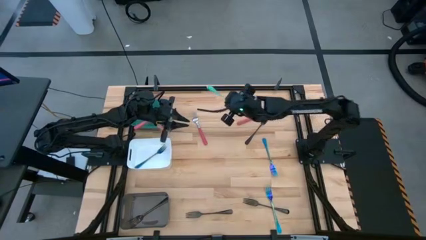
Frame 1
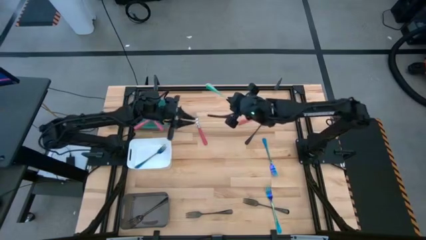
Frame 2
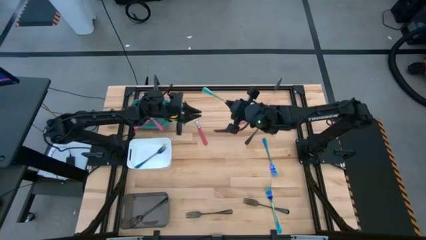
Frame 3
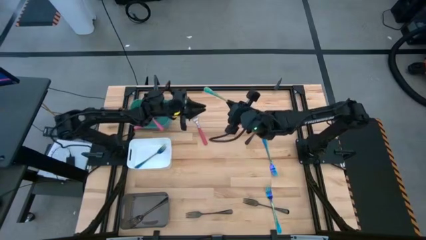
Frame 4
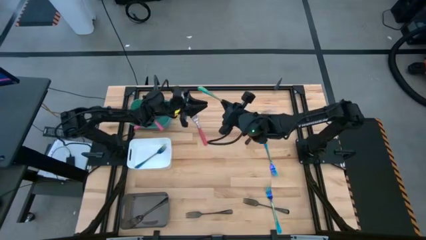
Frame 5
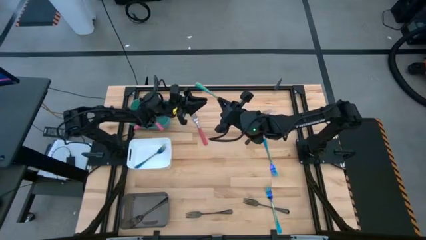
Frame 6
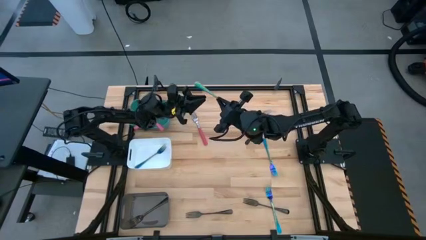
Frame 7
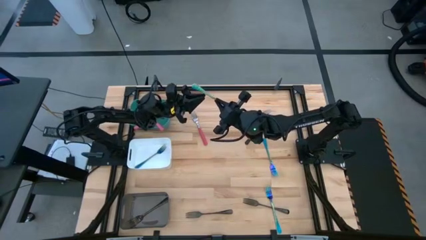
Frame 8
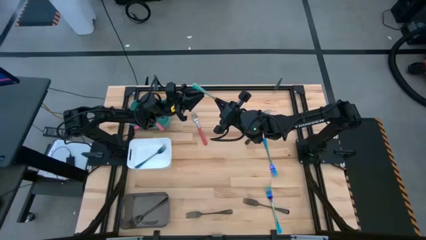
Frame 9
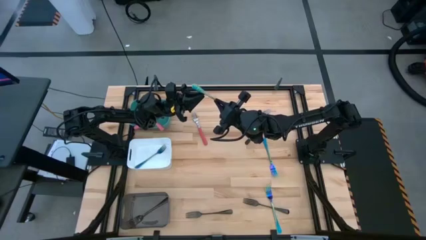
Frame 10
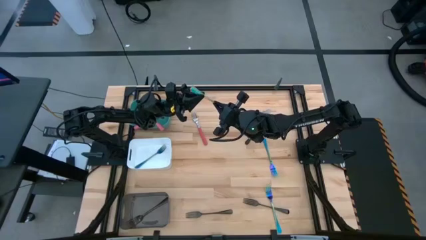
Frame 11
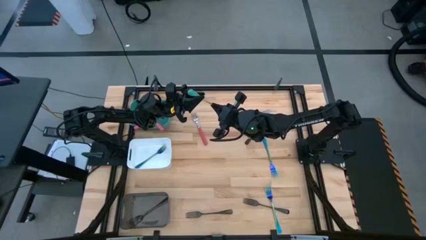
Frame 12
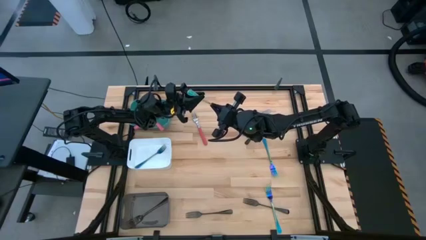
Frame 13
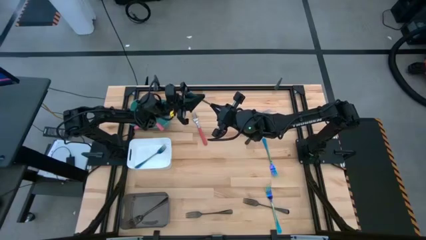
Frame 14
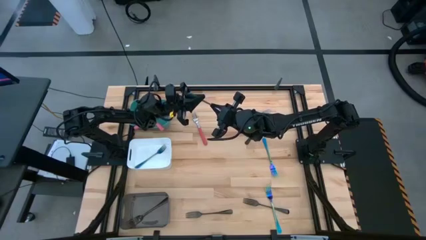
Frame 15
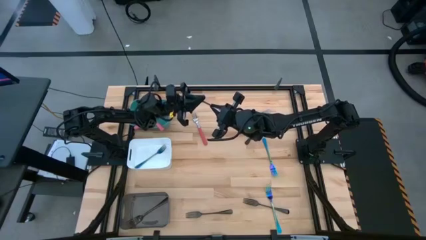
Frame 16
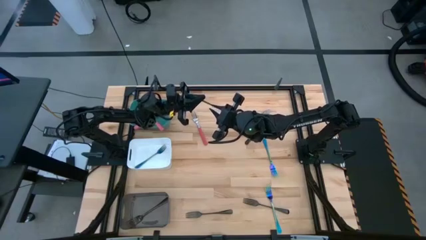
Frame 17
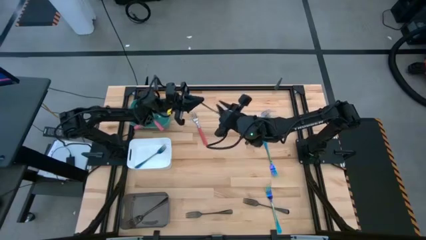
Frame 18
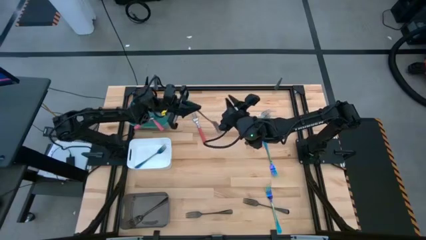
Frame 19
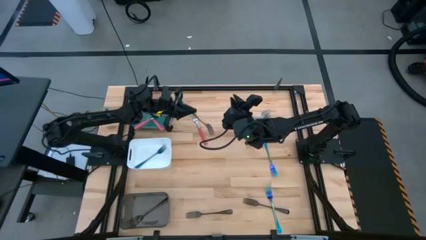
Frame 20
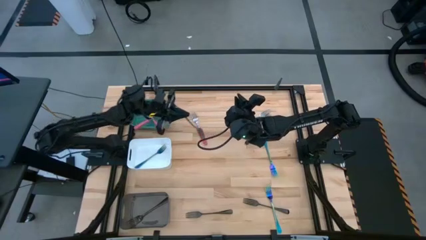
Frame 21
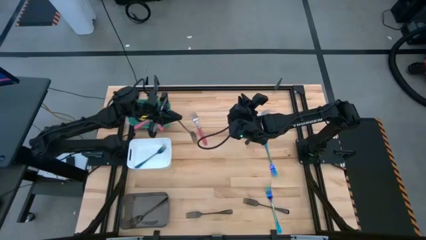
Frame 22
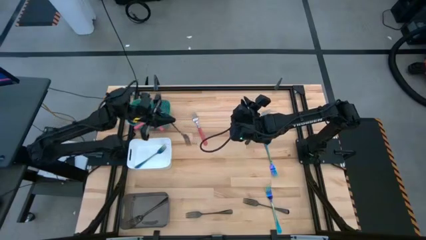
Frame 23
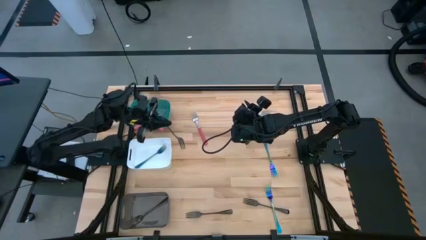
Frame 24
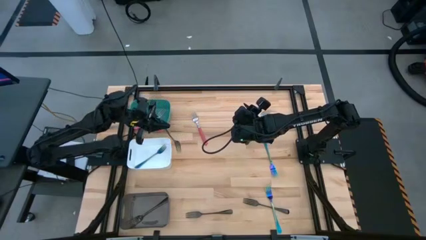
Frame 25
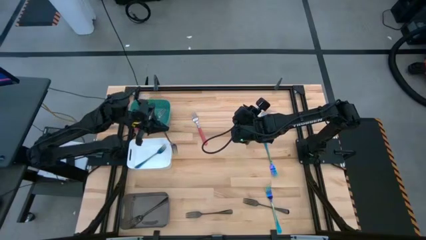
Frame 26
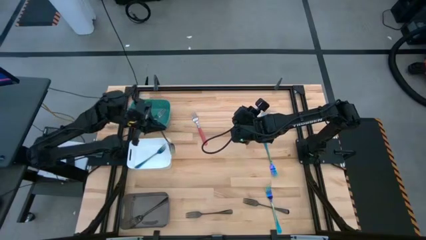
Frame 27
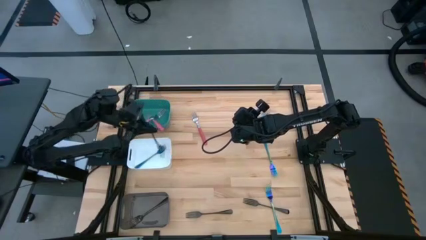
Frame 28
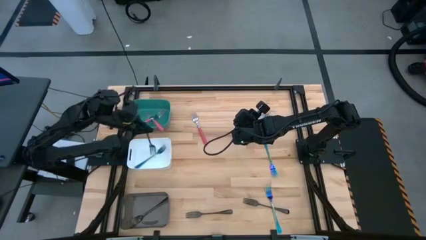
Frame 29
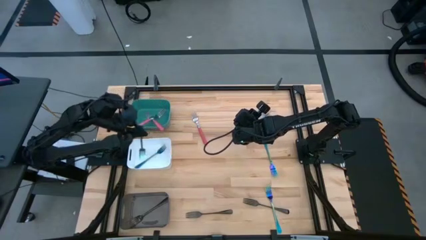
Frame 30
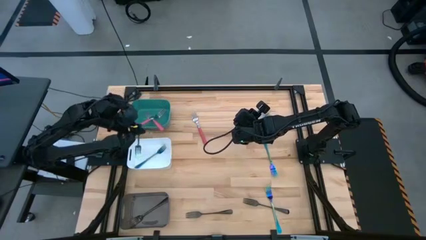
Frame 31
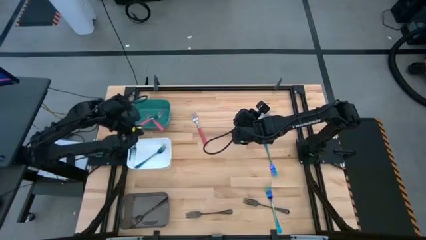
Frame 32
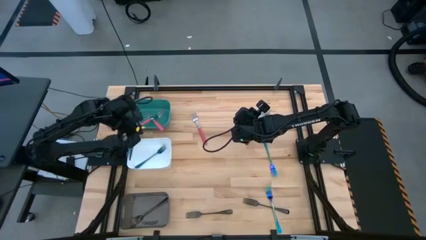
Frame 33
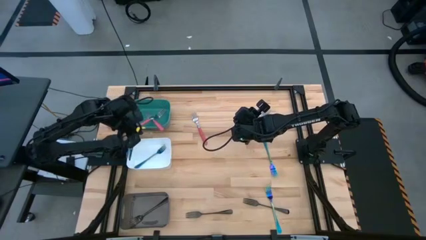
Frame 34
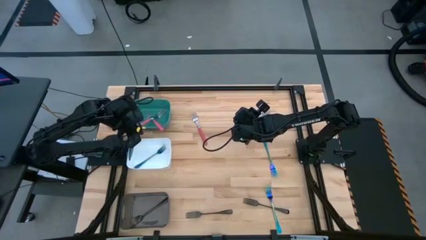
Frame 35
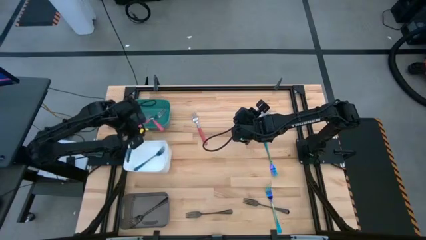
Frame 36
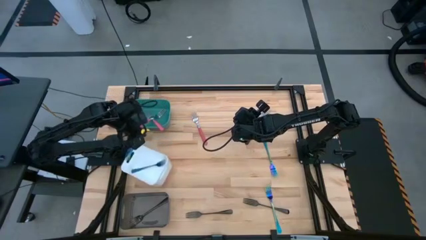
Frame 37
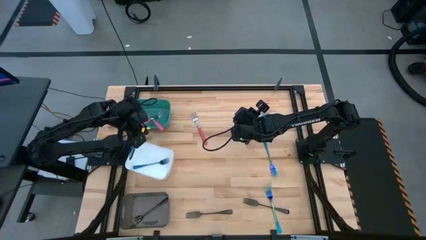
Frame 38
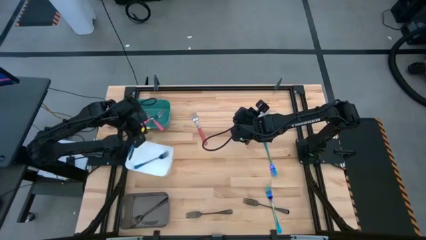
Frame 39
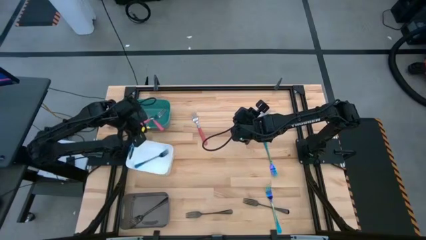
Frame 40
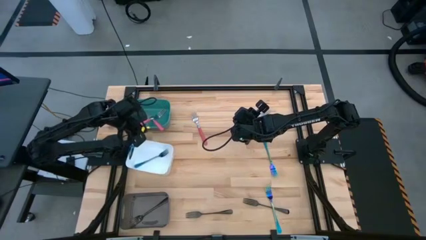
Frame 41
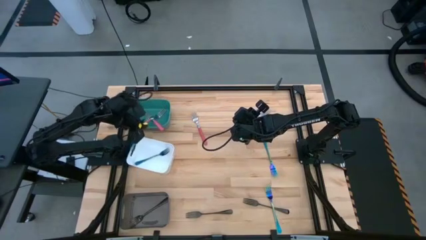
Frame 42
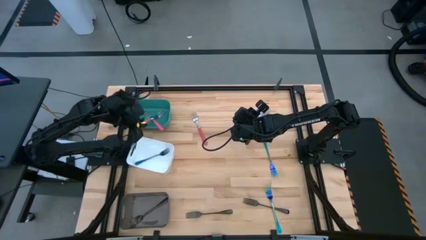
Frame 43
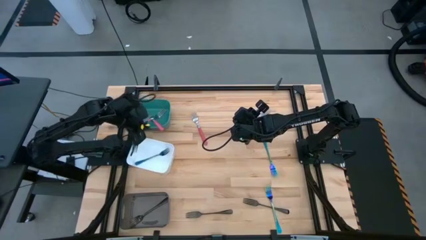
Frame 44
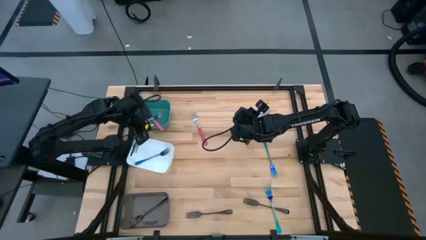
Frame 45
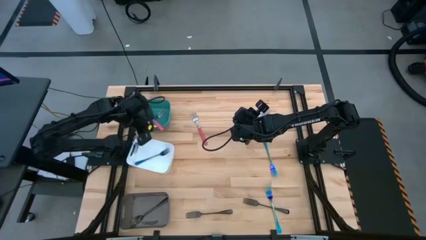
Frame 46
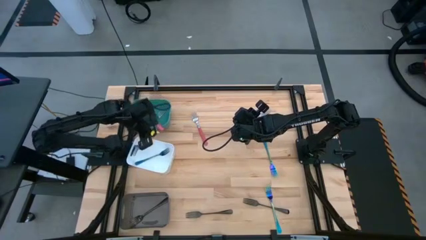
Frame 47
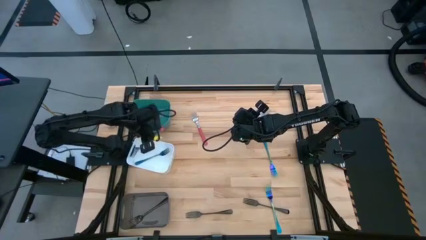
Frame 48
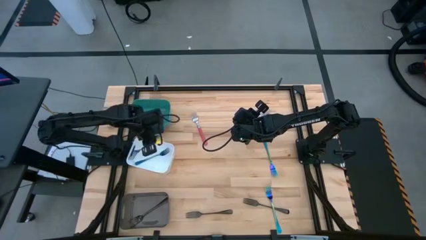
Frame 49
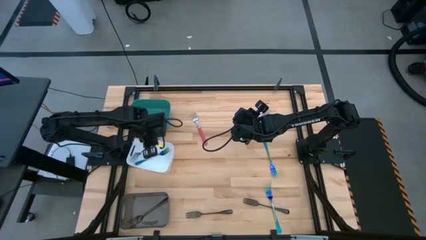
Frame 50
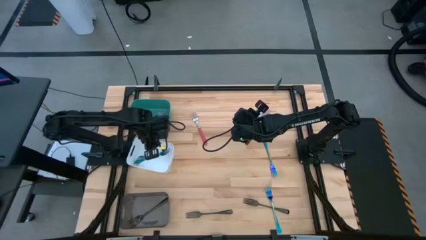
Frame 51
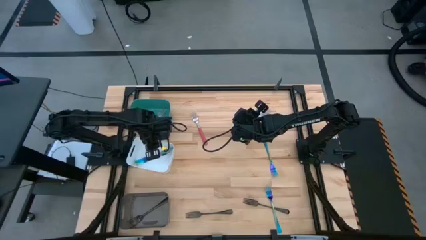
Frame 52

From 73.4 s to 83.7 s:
Task: Sort silverware by color (type)
Put the blue fork into the white bin

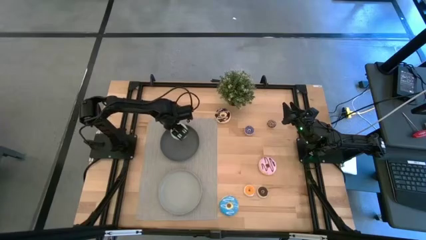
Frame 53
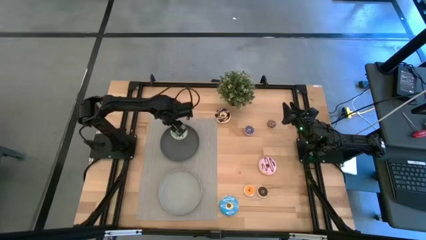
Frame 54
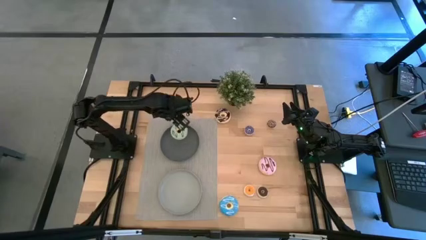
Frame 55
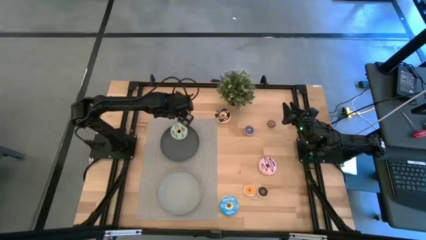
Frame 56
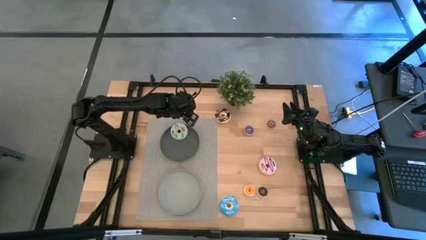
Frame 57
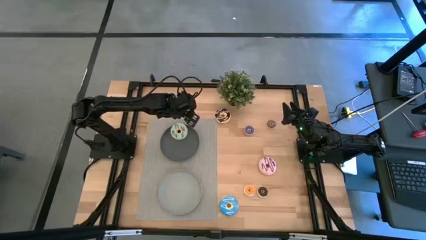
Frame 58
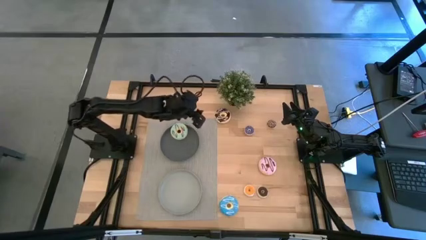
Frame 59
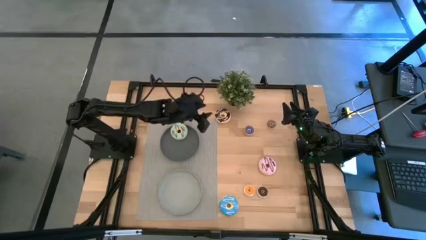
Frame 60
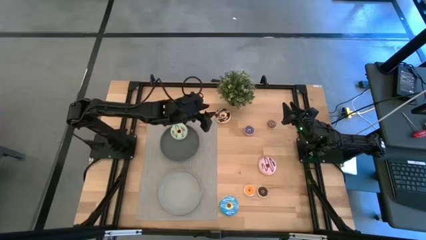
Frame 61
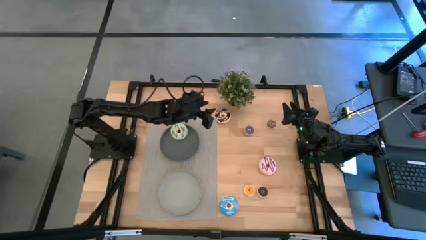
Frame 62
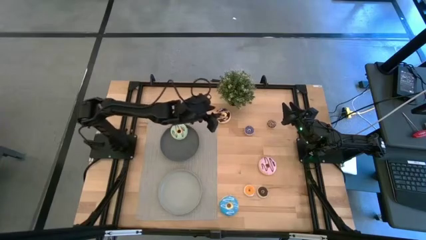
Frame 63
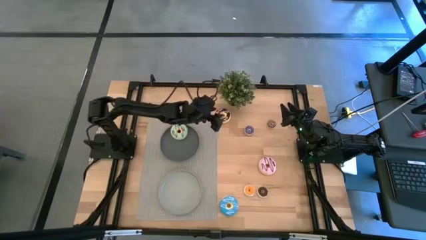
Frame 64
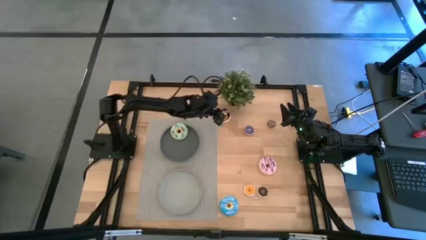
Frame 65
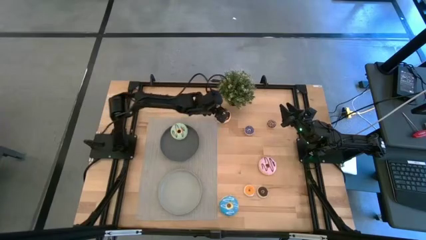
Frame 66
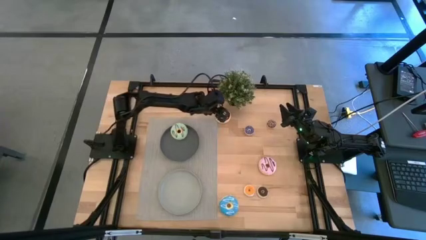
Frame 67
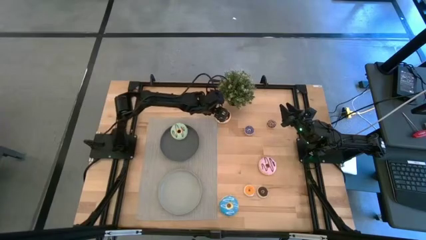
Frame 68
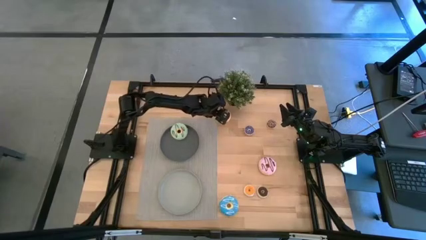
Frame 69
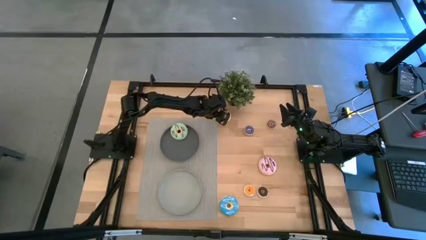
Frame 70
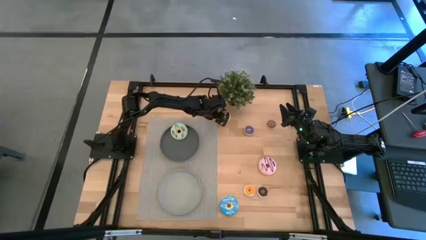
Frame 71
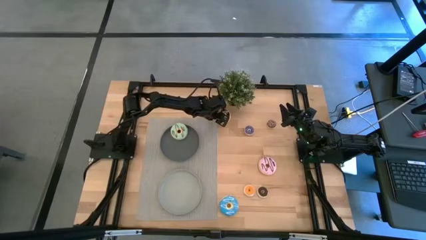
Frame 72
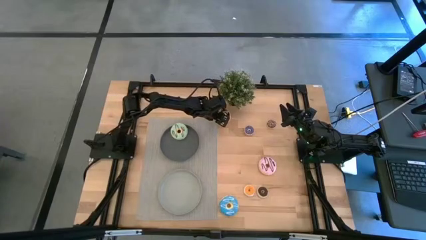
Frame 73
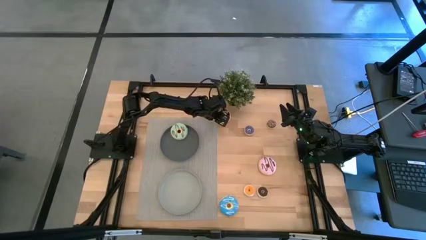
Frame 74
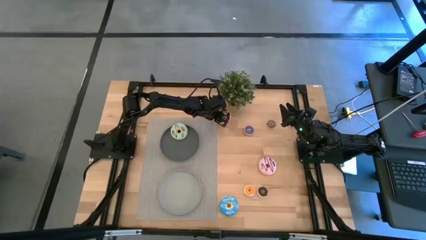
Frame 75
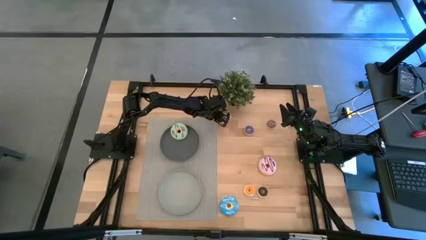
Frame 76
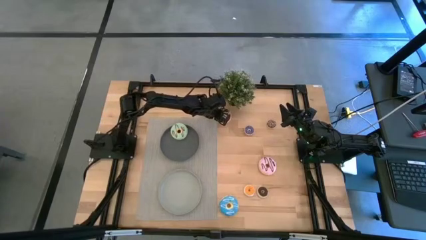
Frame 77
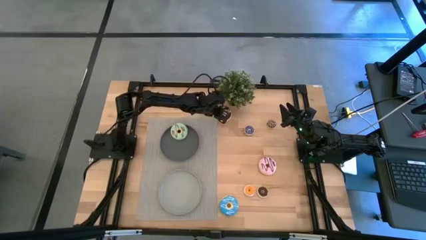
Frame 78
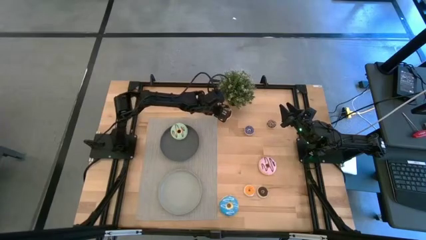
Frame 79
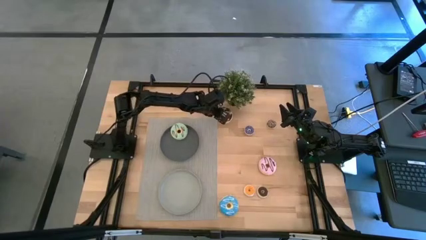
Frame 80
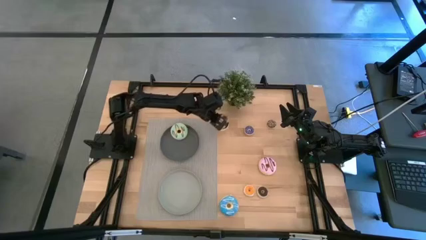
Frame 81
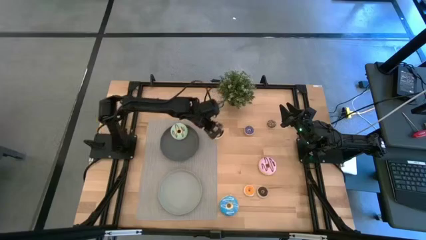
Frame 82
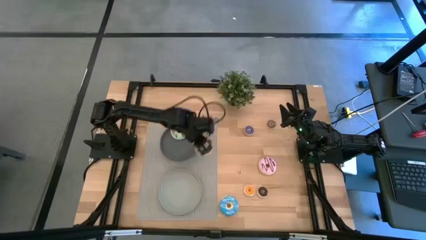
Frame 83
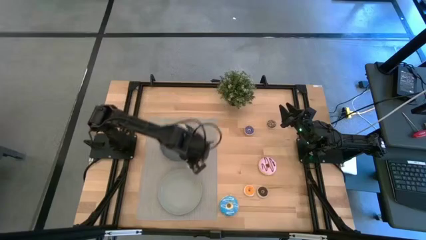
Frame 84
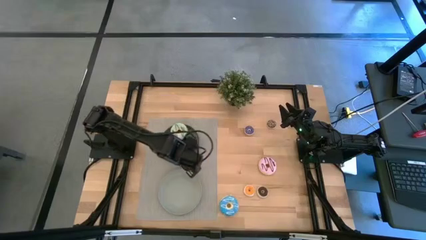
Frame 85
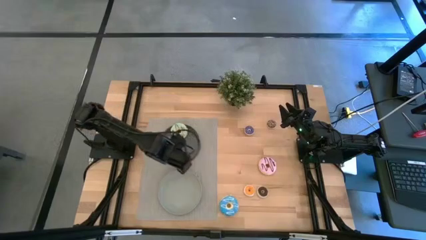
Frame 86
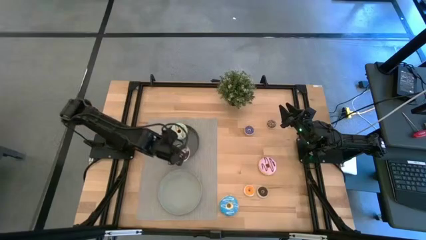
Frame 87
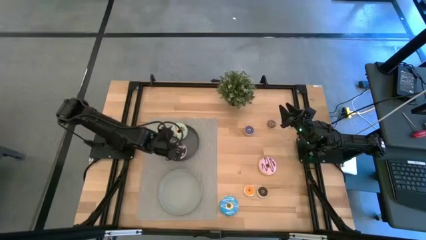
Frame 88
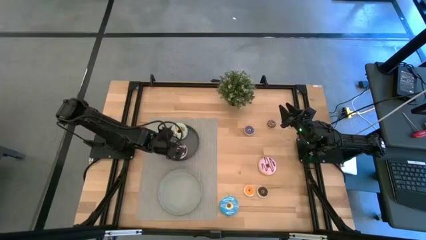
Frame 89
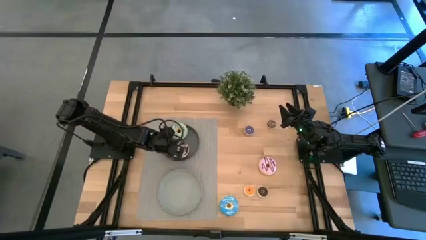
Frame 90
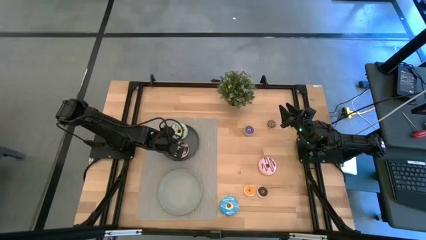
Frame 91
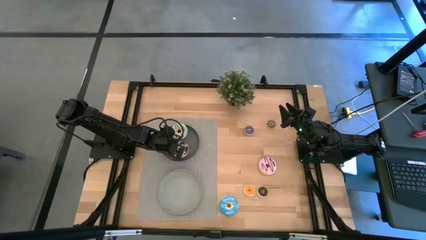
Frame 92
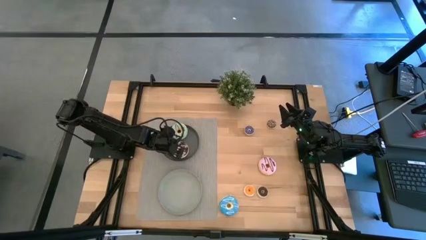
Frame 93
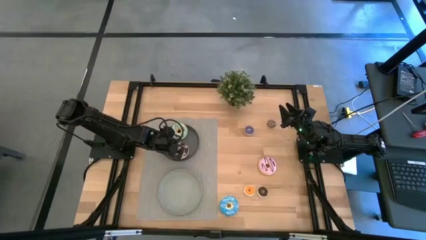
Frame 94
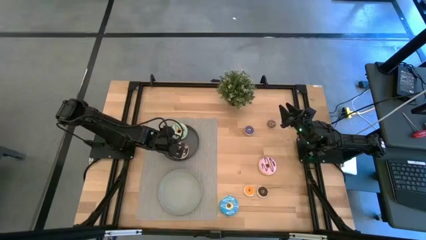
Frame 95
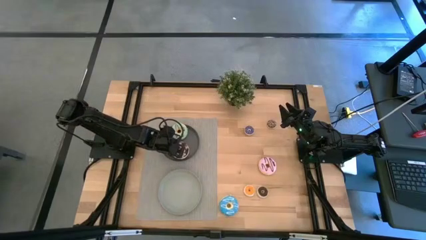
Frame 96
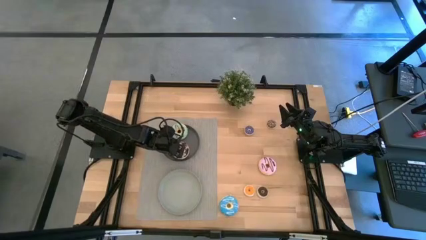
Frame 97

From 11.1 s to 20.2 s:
Task: Pick & Place donuts
Put the big black donut on the black plate
